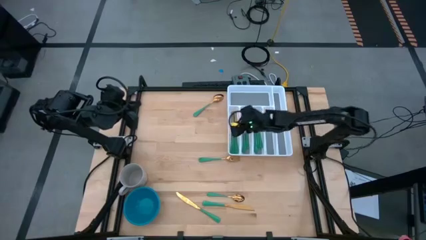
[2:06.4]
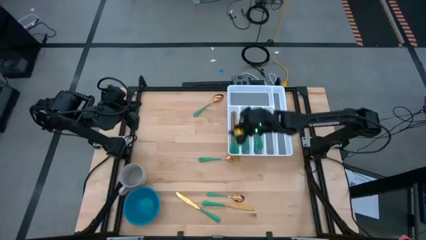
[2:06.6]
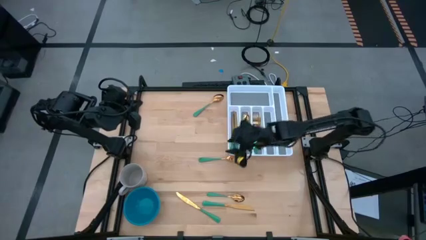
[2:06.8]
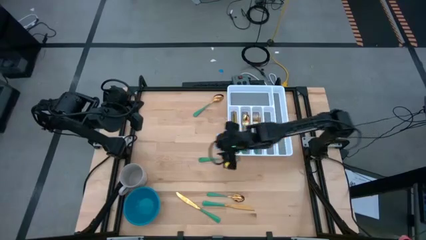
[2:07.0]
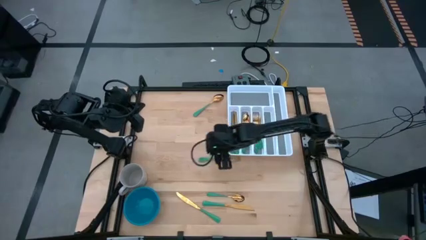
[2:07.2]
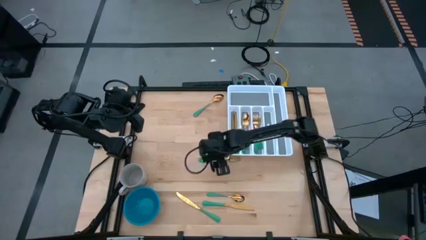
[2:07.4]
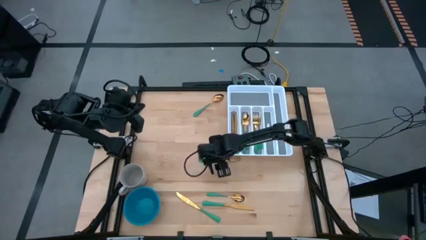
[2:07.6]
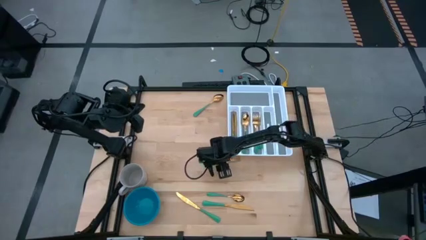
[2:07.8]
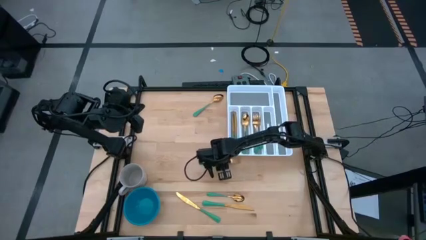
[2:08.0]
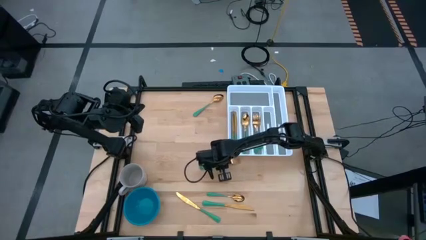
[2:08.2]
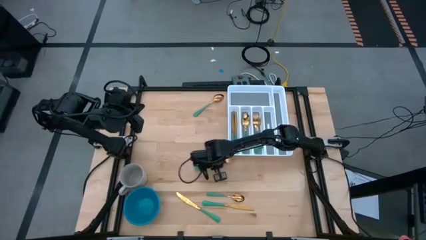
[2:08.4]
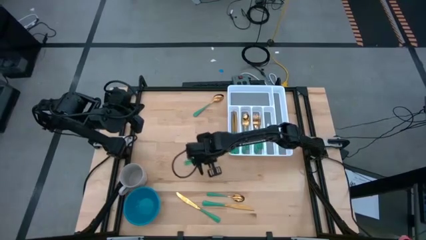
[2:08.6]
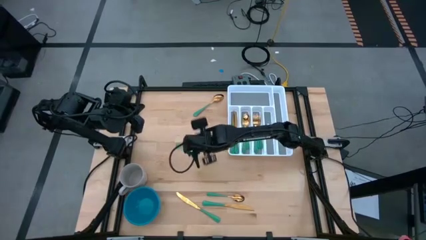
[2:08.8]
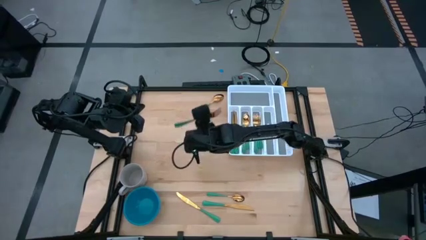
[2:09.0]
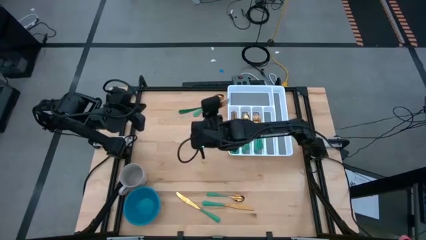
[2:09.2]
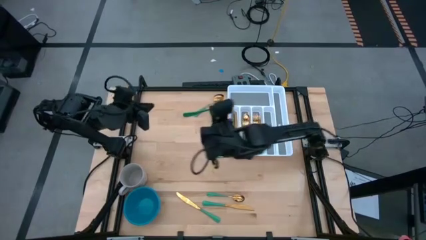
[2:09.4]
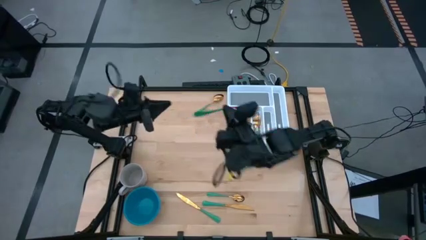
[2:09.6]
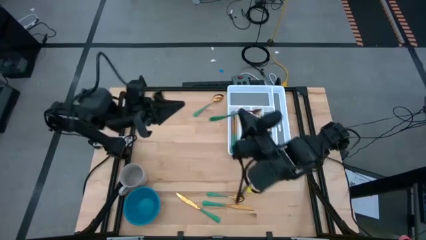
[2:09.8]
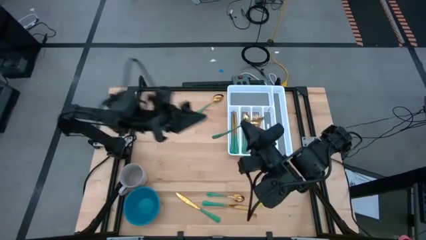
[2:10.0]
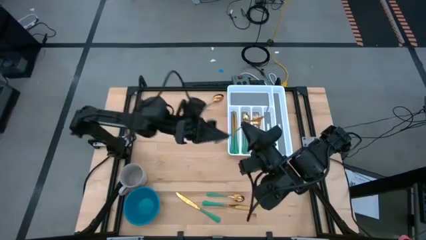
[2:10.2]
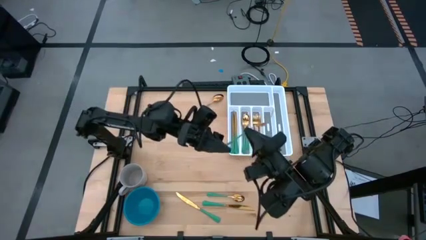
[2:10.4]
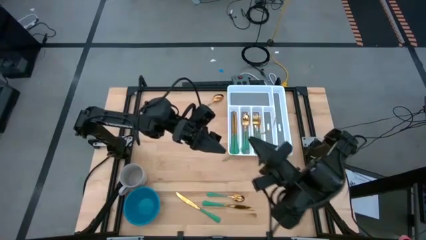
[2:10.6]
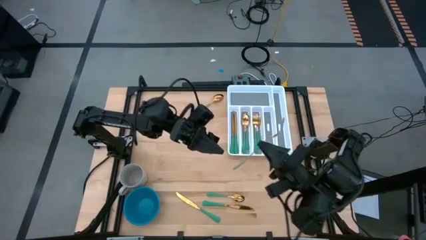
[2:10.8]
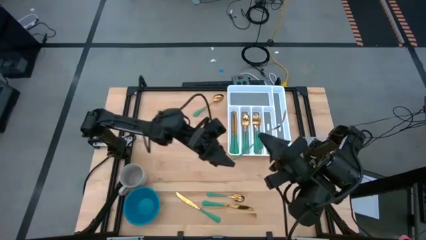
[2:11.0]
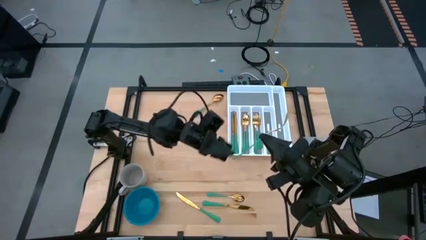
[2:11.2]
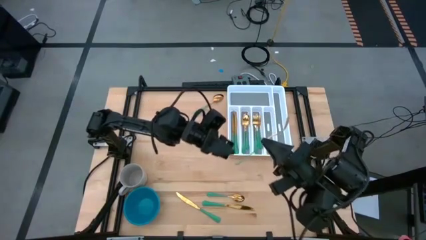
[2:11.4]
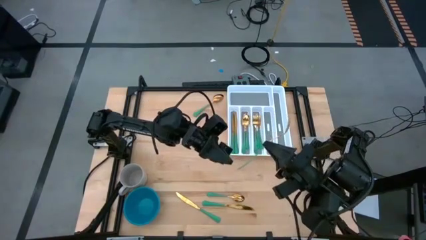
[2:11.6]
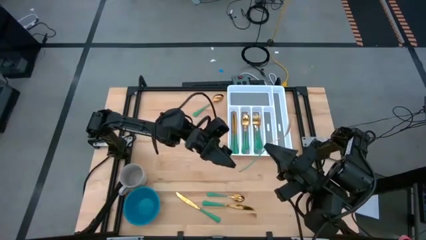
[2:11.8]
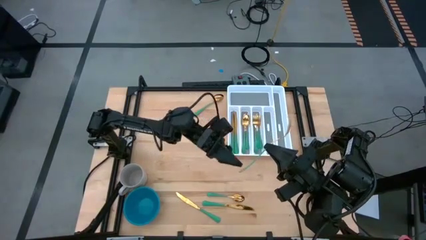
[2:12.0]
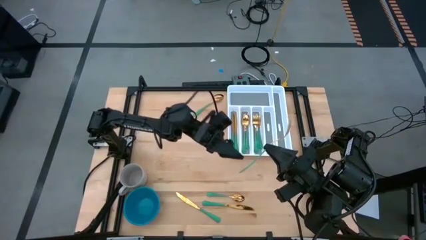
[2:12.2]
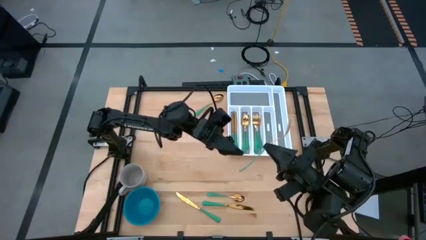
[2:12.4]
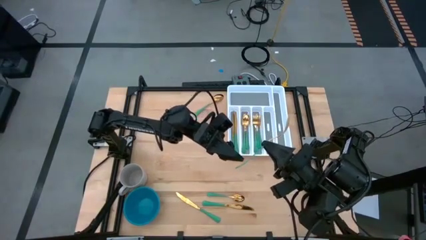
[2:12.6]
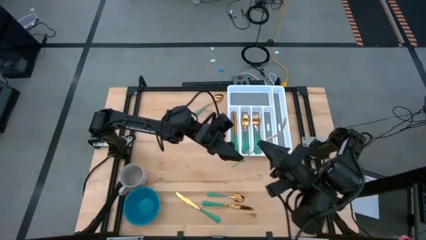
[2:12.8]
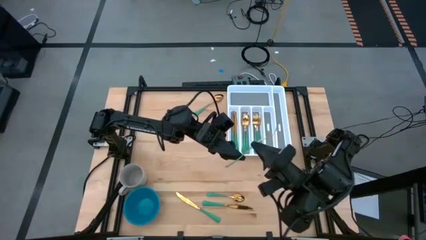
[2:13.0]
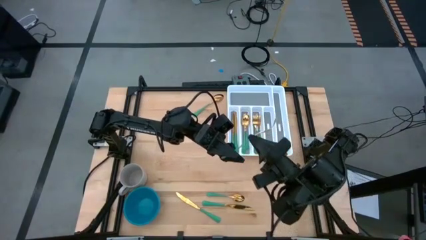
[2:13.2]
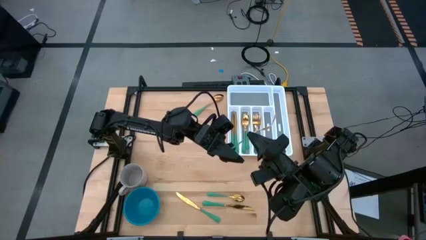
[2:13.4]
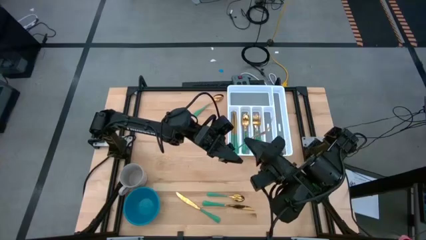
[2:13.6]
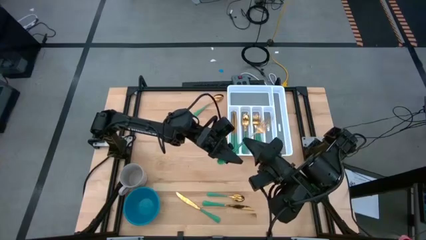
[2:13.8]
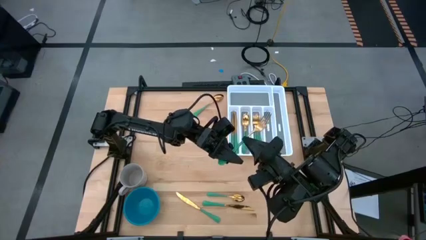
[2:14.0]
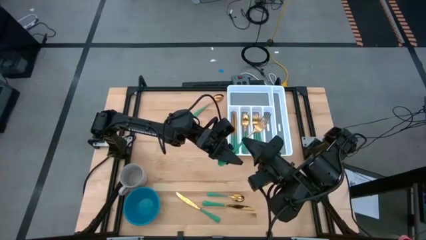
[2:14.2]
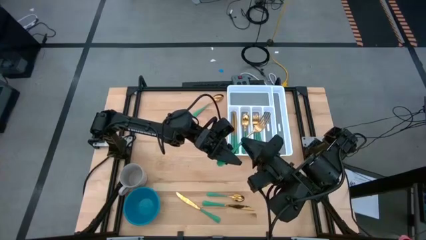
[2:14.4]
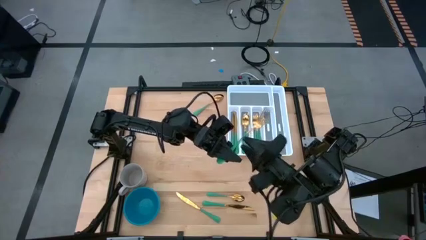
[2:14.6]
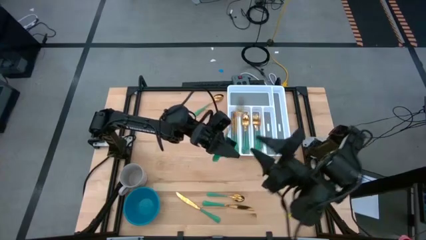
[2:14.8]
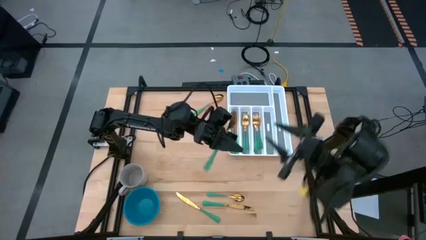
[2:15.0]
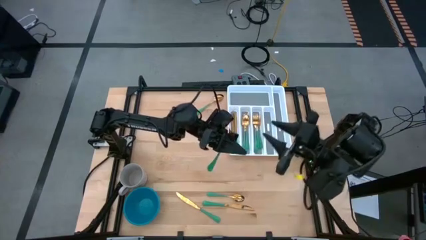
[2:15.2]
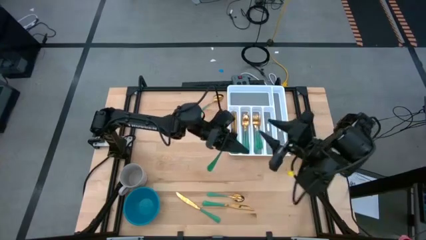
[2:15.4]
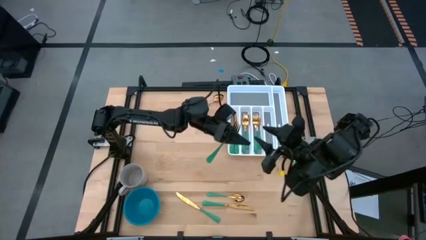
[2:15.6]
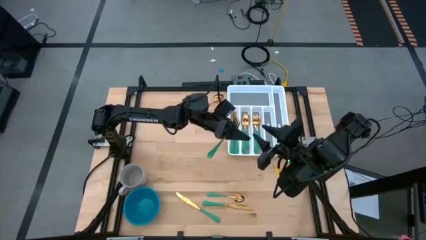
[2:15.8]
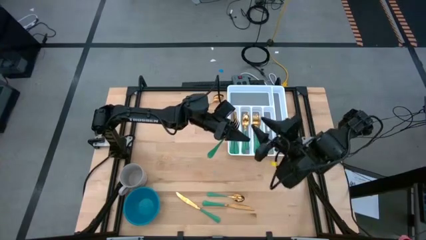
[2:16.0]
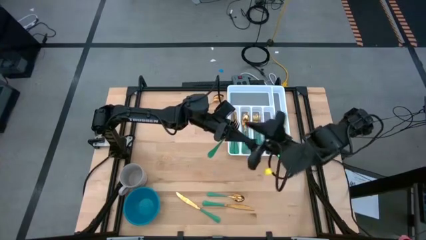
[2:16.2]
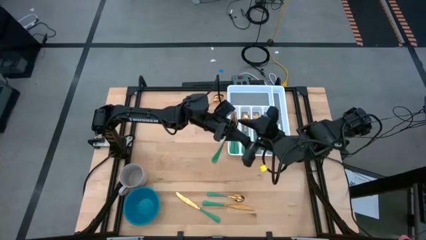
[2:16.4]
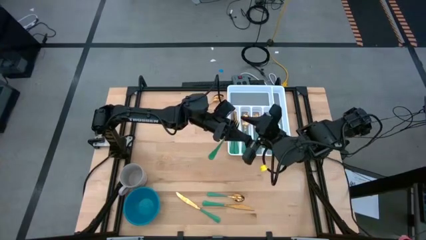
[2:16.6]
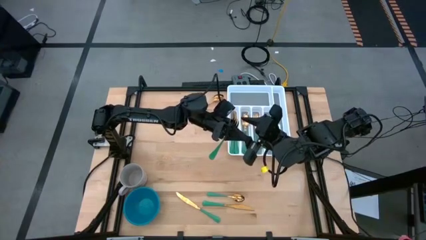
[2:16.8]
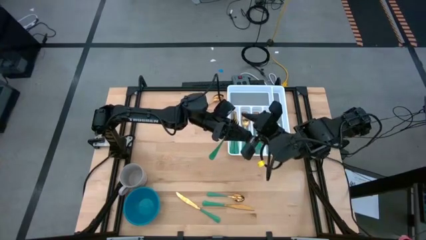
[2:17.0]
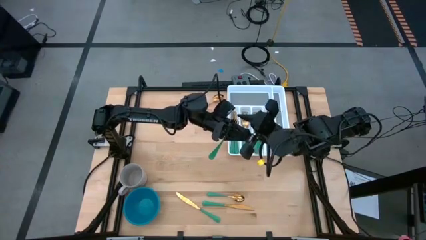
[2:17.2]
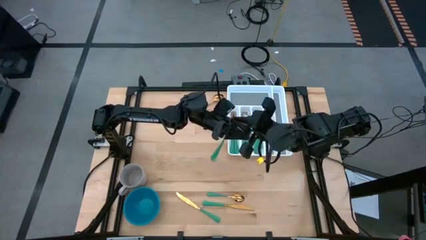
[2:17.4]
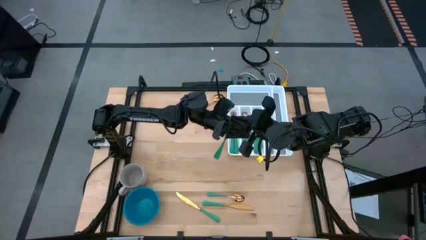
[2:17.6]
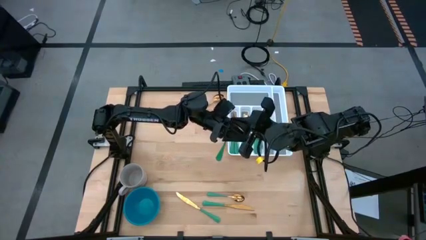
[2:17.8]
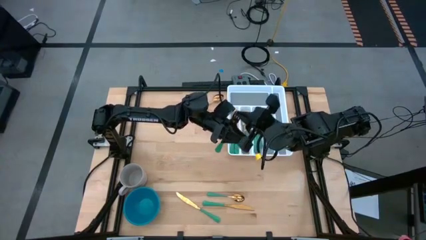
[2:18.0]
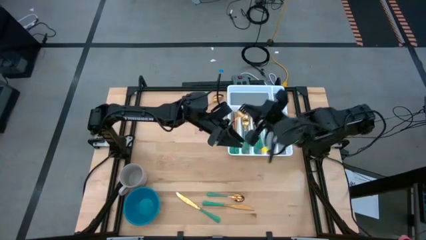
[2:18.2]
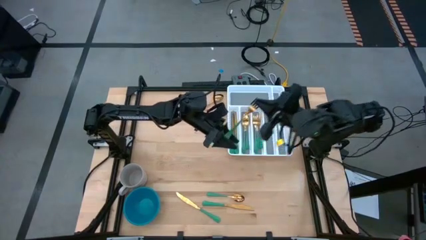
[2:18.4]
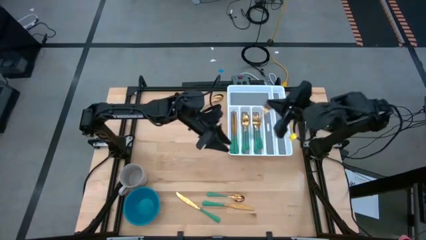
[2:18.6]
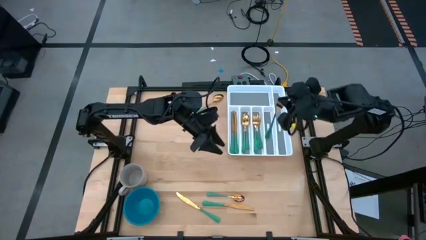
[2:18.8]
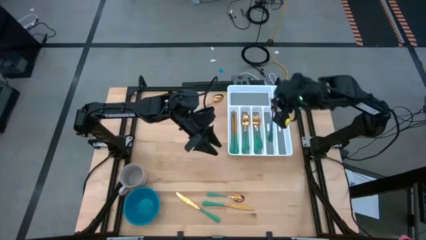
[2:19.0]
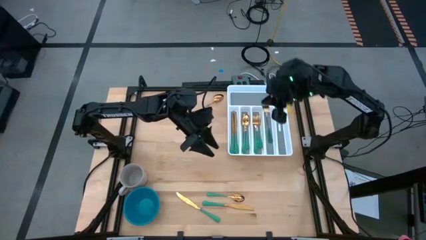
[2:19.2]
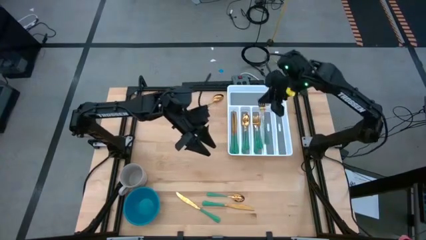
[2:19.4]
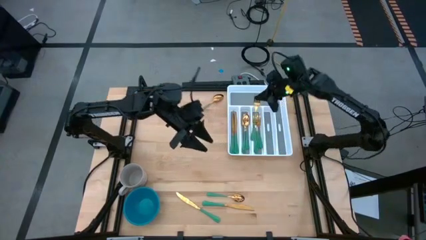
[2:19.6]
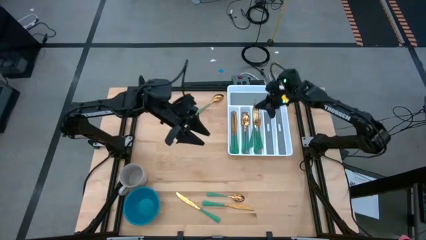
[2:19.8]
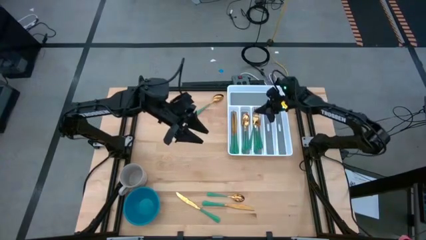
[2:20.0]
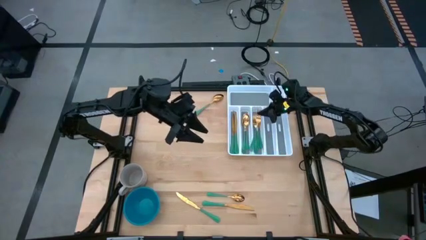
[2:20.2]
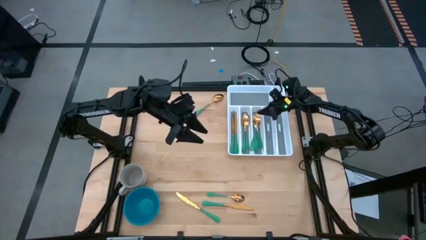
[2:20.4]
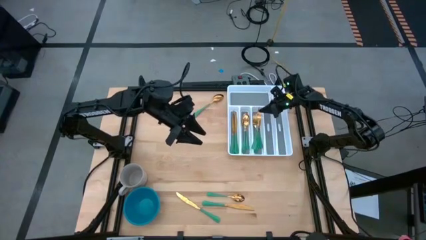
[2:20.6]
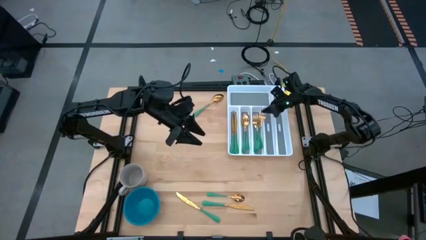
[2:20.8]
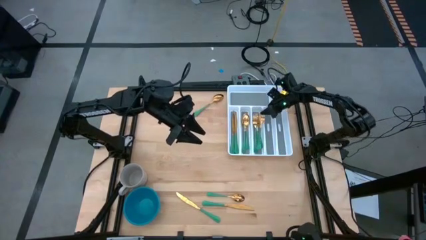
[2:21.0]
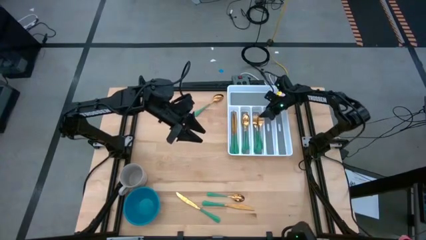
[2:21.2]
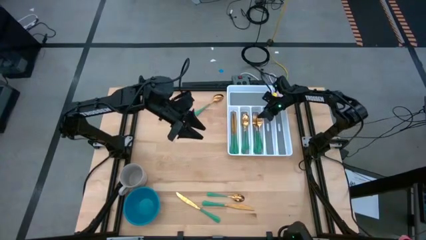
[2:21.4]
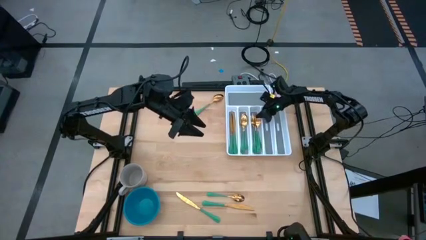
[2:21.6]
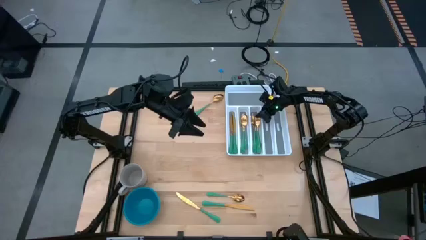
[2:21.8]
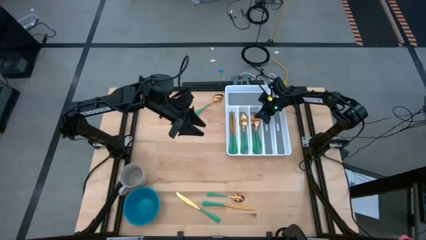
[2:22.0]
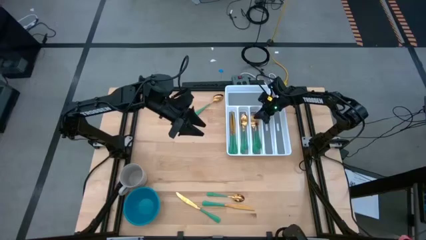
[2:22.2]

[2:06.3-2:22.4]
Task: Sort silverware
Put the green fork into the white cutlery tray
